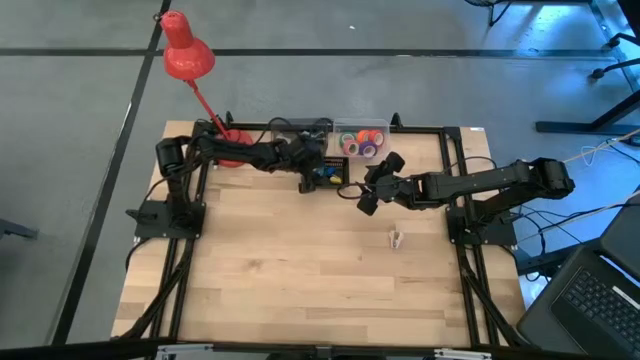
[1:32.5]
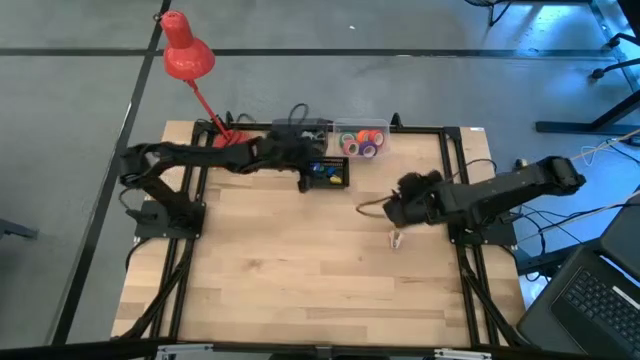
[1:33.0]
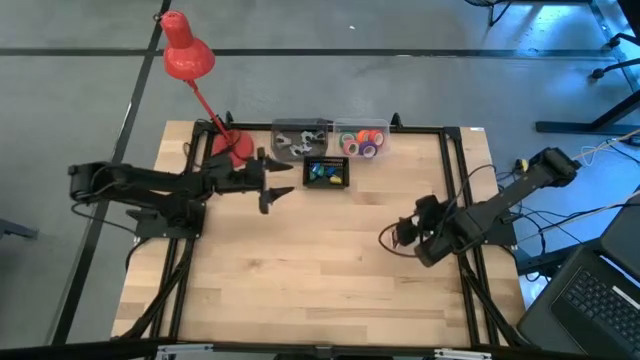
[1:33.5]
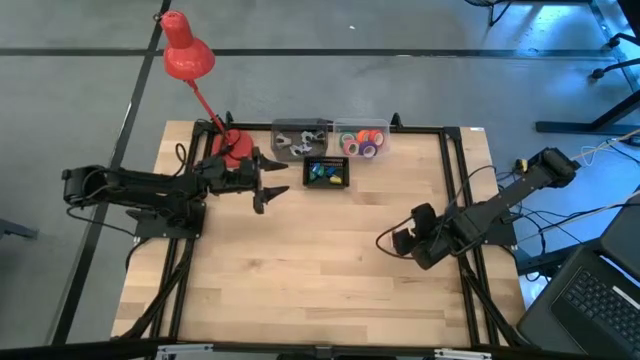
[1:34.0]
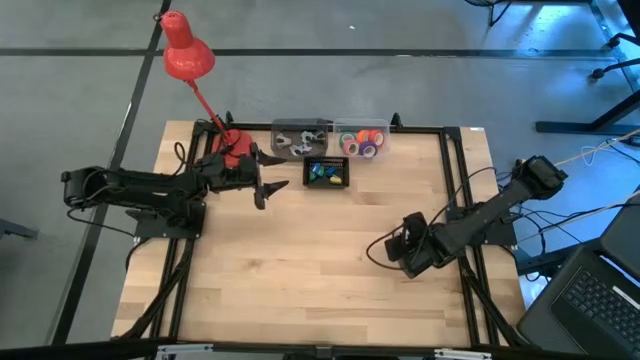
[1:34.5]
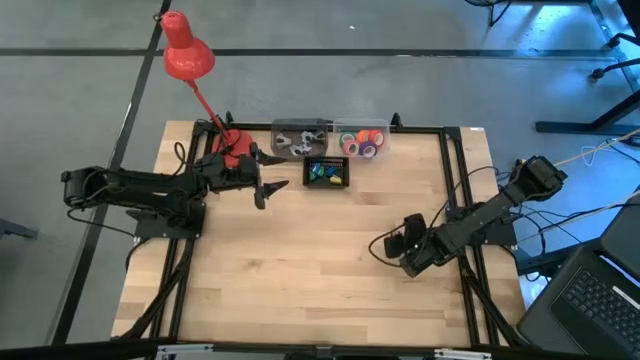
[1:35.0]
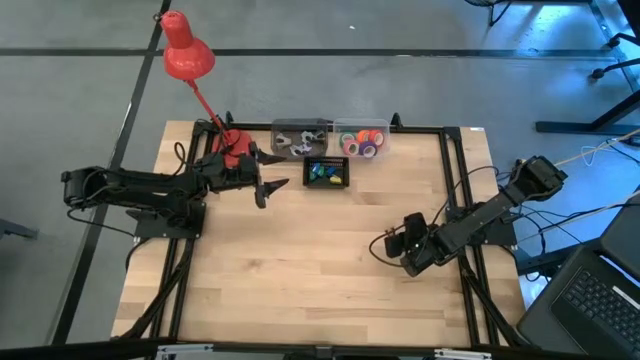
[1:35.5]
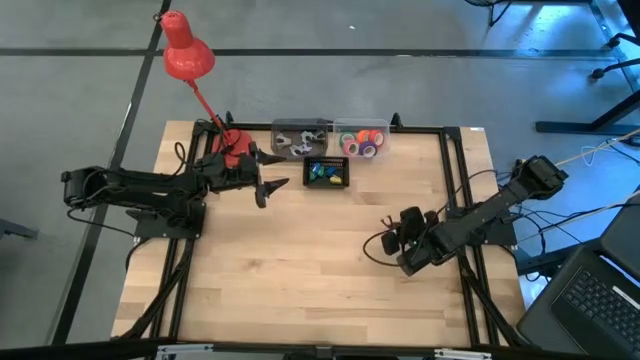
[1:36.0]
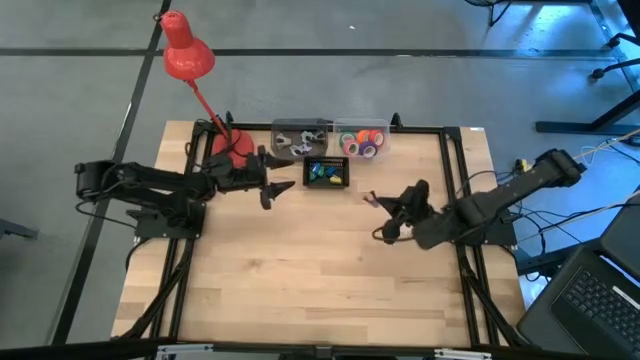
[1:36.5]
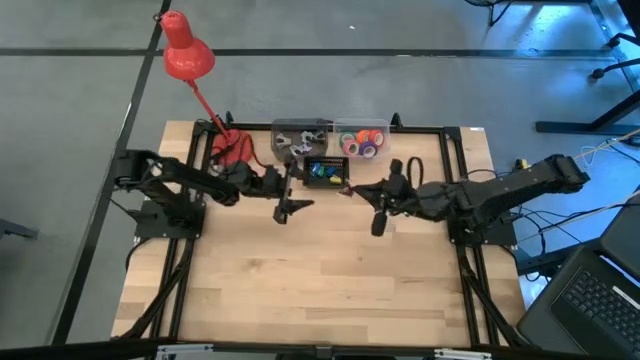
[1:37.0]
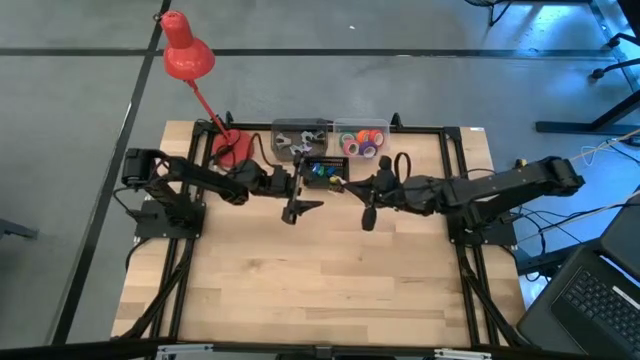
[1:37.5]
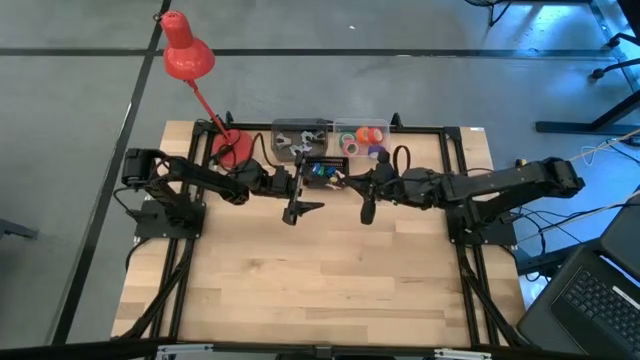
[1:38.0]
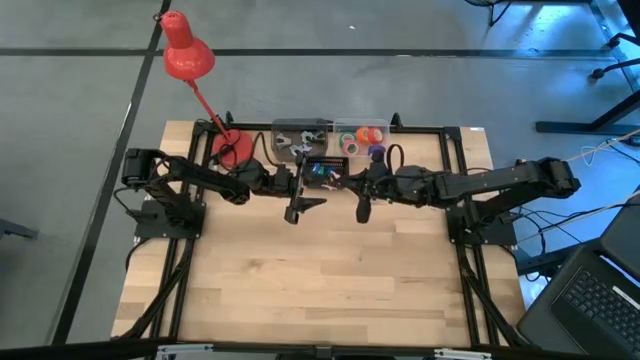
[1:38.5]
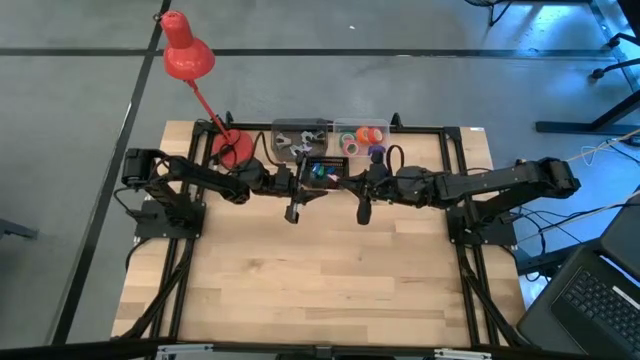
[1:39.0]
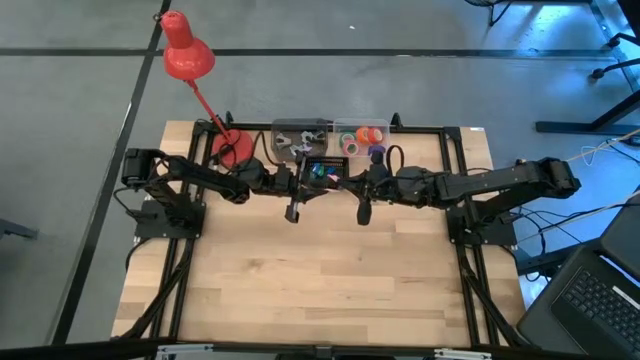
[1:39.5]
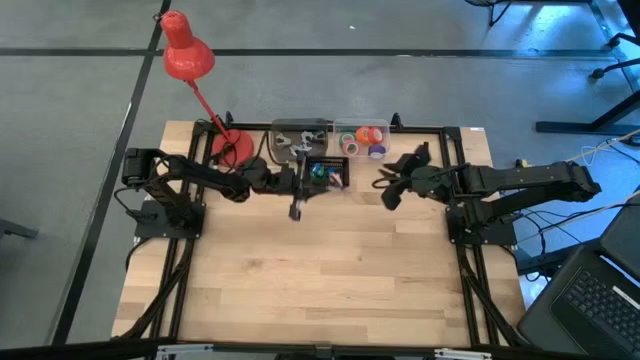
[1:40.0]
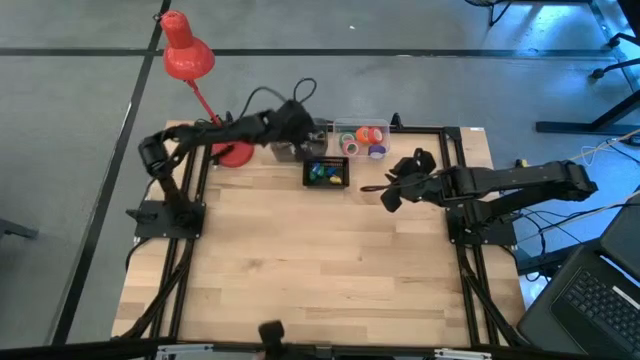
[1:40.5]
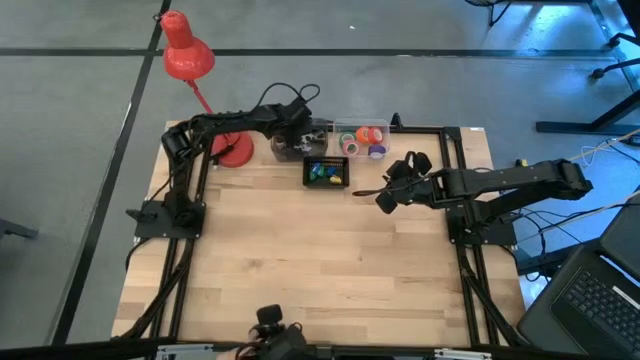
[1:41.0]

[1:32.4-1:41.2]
Task: Pick and place Stapler, Stapler remover, tape
Put the pink staple remover into the gray bin

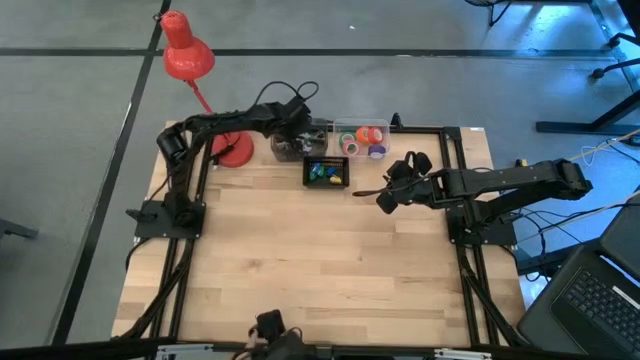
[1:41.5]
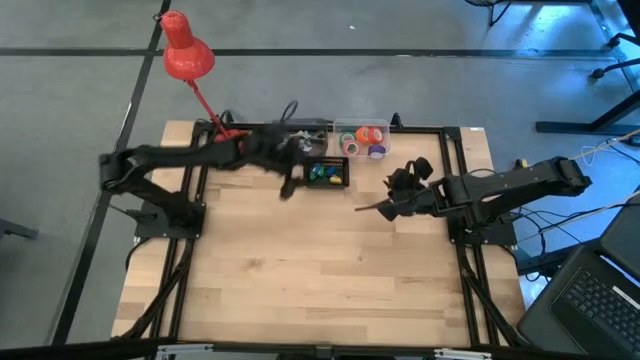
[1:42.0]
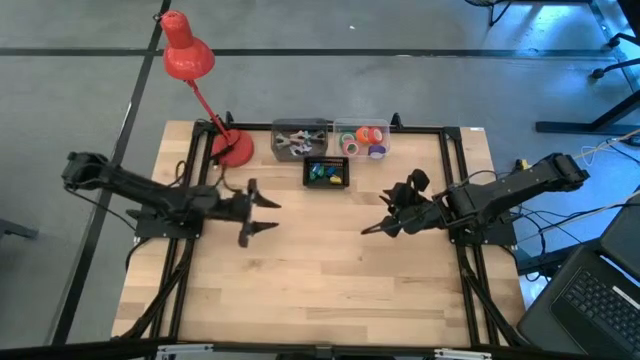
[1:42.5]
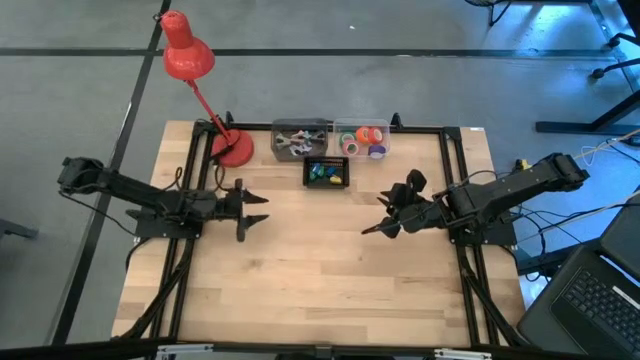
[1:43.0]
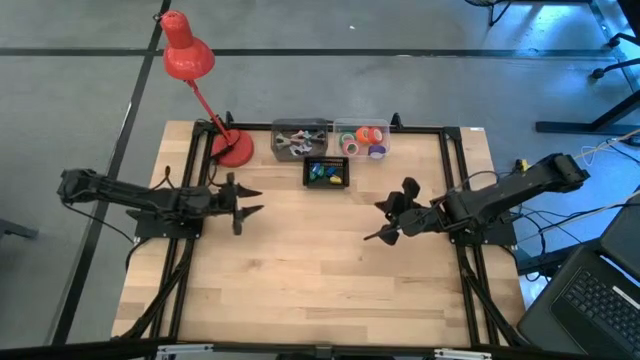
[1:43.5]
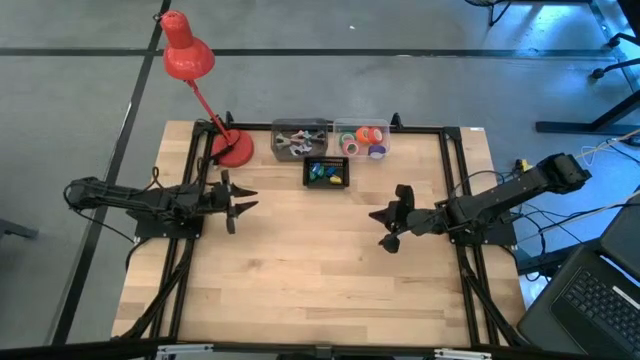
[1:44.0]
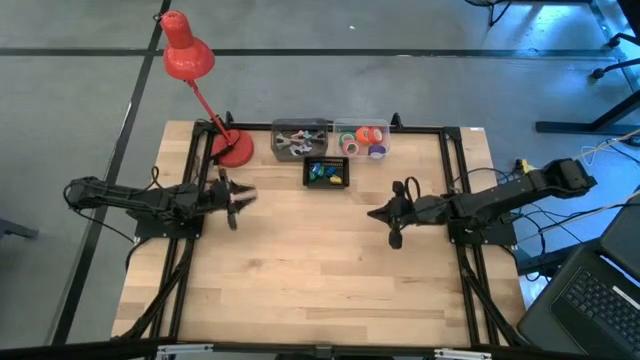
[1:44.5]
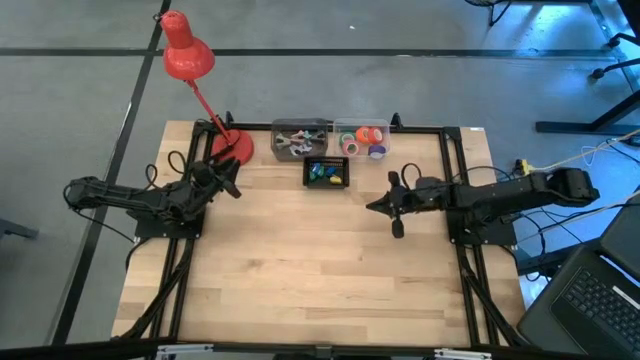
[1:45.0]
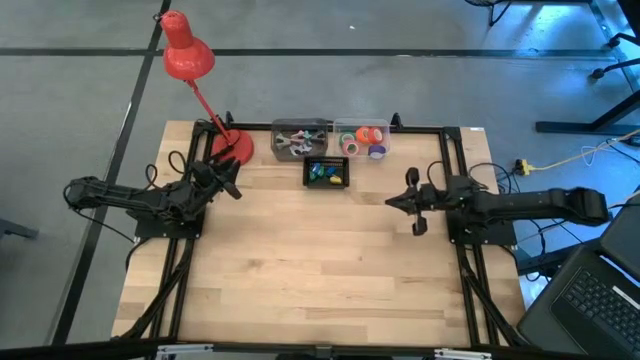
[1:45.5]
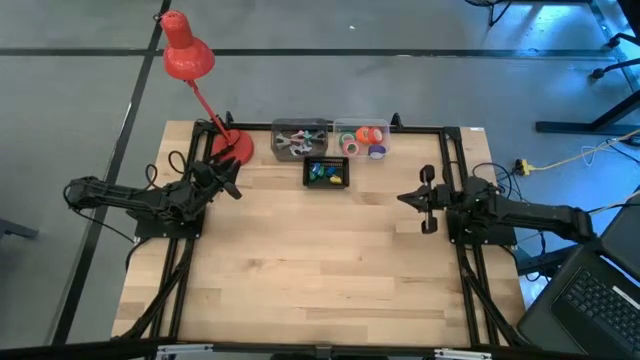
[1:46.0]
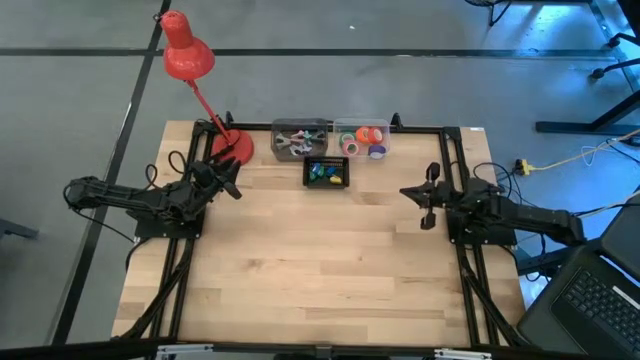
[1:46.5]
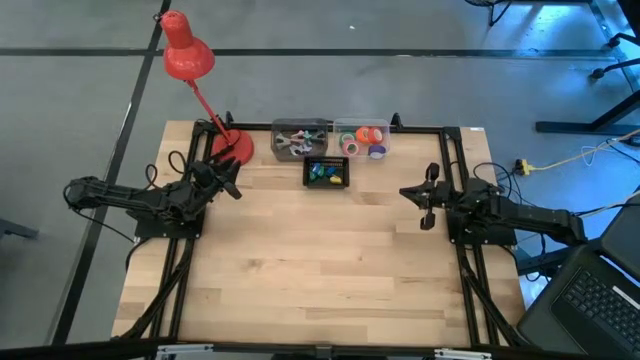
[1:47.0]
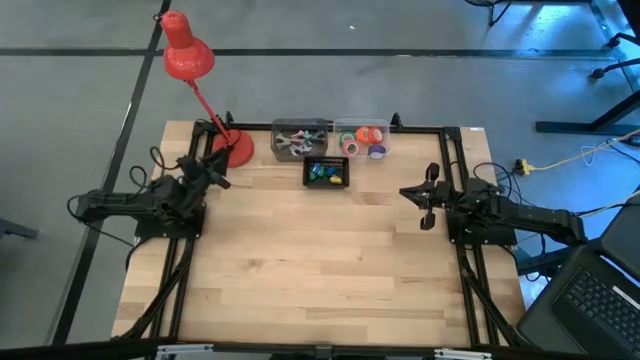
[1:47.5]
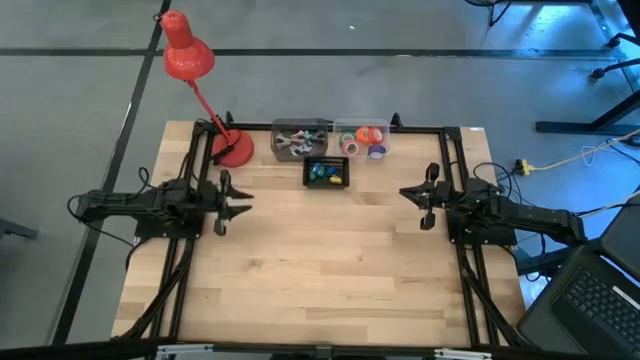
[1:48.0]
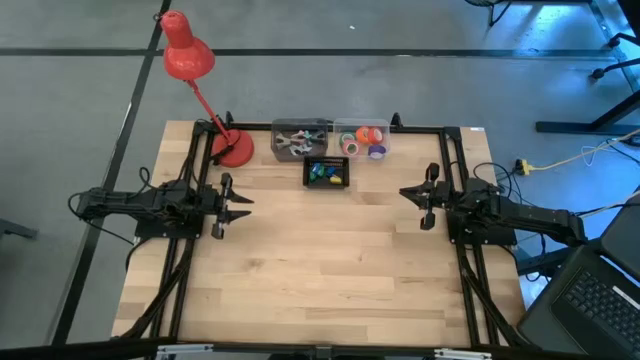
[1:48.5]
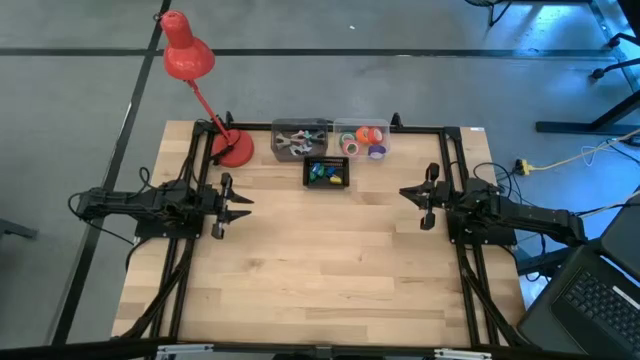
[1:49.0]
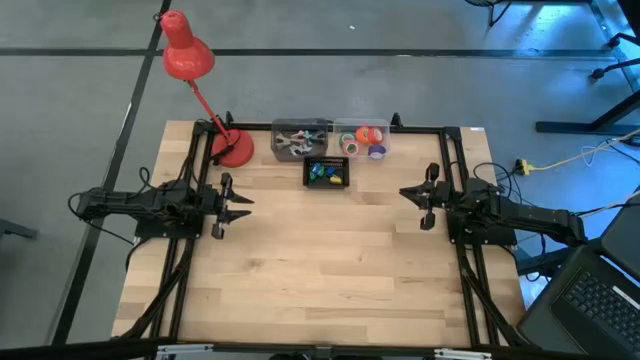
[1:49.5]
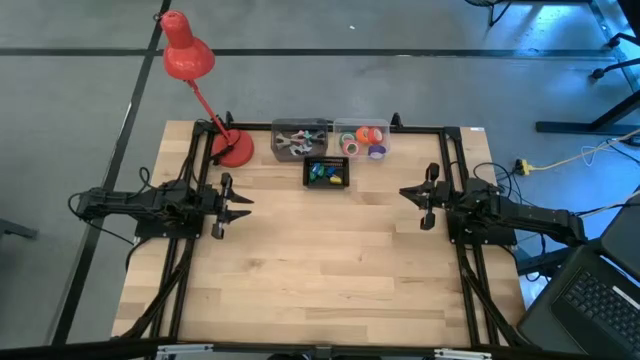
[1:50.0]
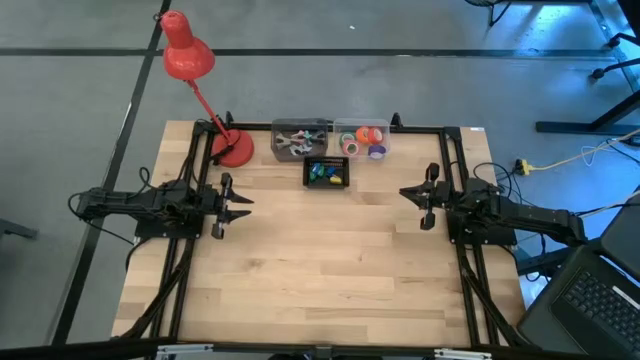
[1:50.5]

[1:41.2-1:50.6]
Return to Home Position

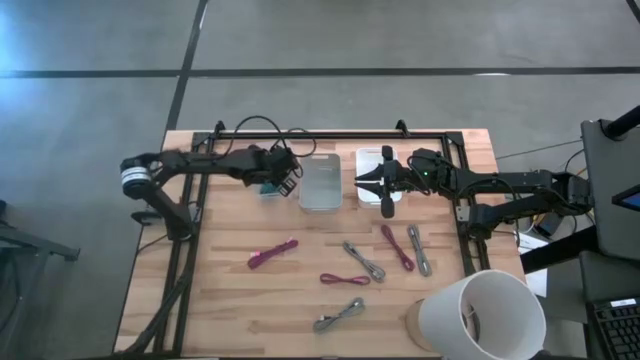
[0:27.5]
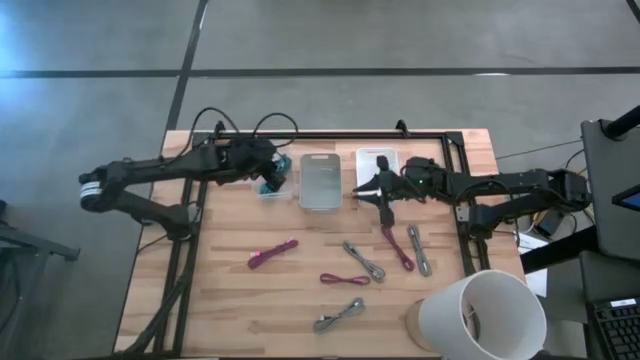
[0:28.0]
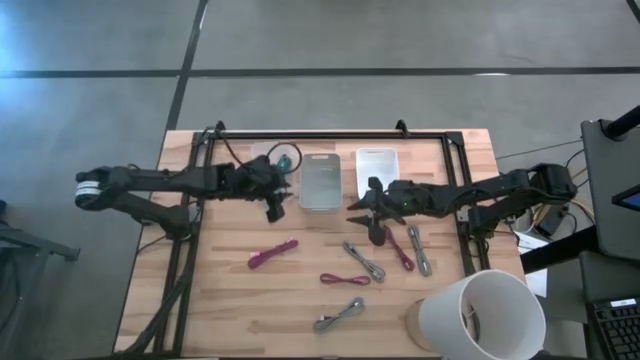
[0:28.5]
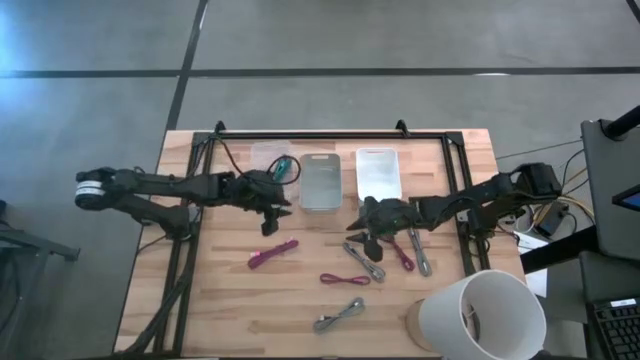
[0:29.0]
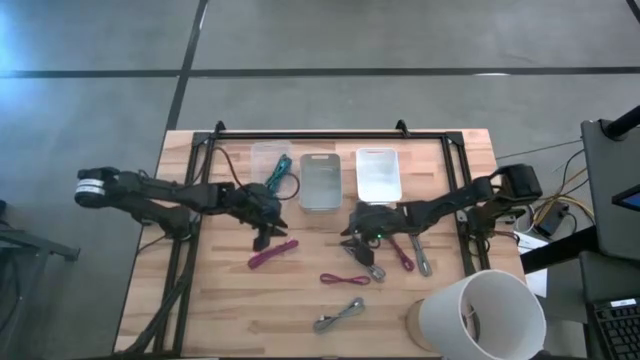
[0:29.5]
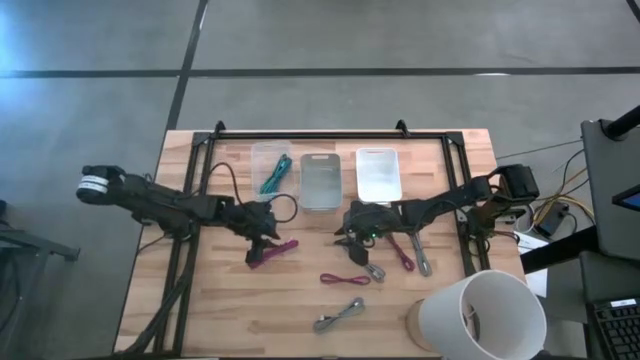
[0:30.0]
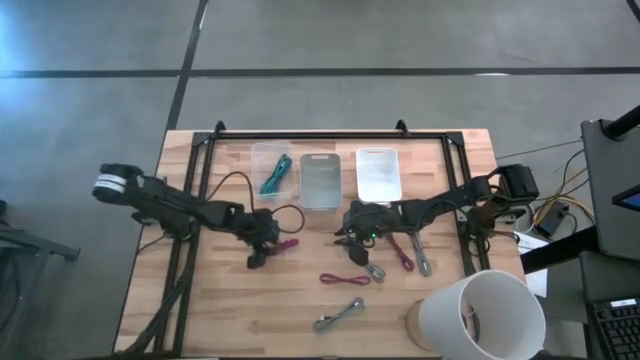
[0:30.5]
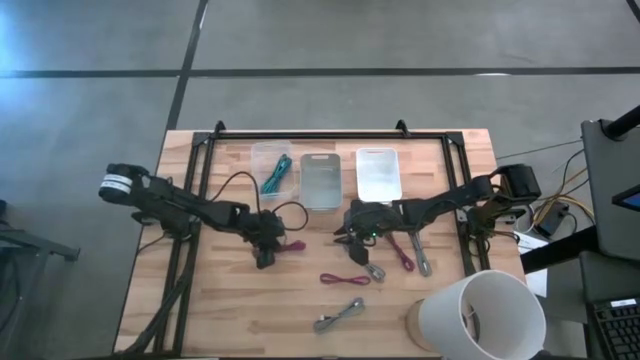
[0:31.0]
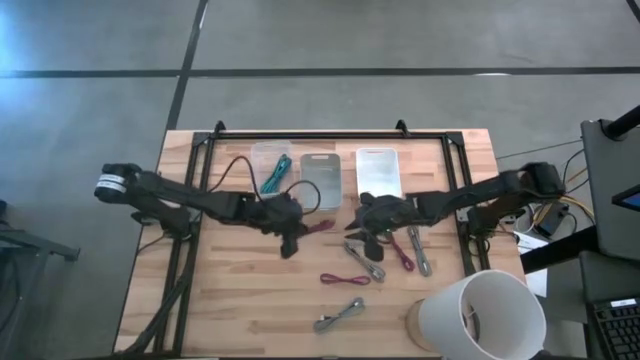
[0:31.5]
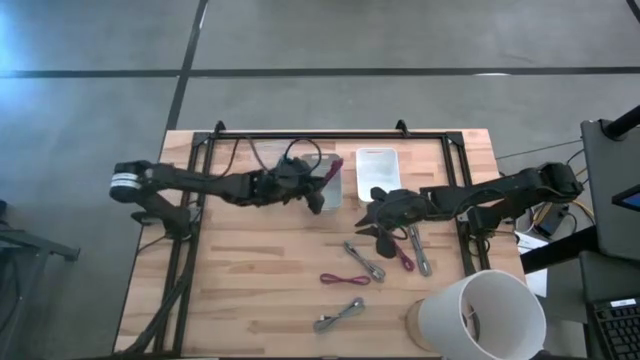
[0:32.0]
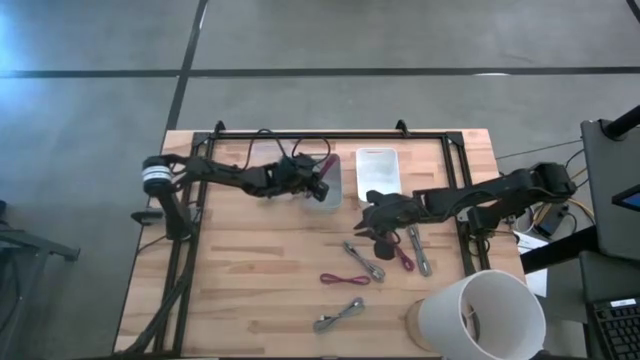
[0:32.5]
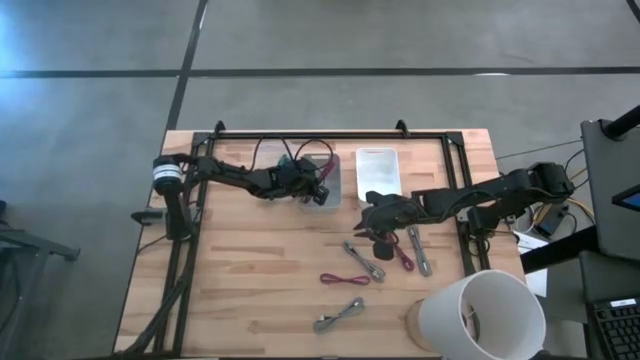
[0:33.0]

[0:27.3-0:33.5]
Task: Pick & Place USB Port
Put the left pink charger cable into the gray bin
